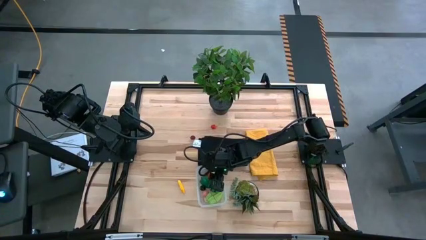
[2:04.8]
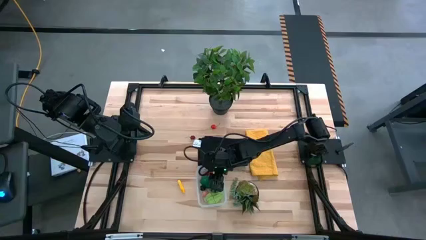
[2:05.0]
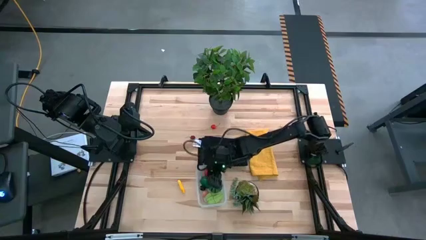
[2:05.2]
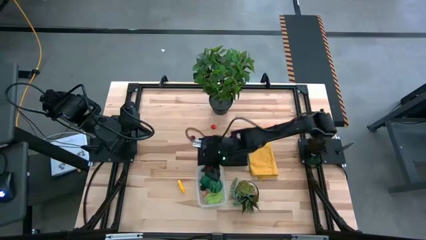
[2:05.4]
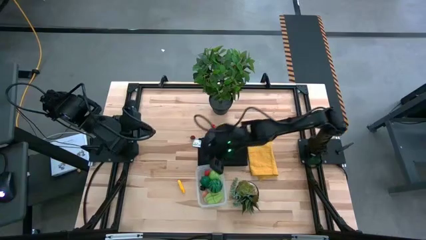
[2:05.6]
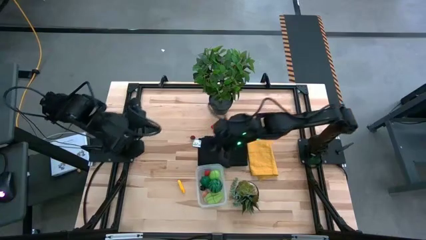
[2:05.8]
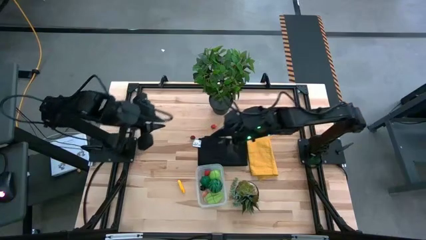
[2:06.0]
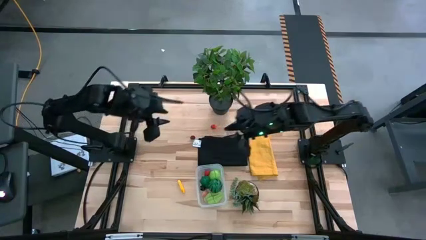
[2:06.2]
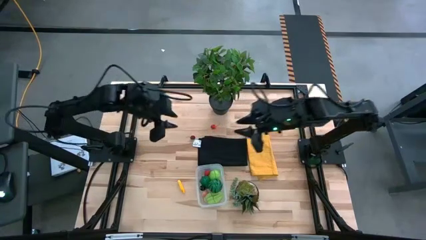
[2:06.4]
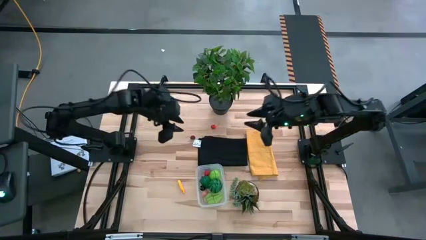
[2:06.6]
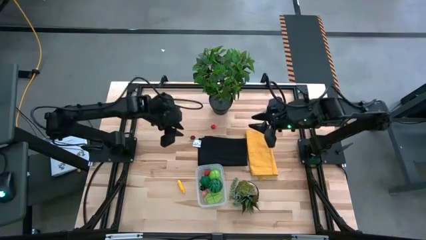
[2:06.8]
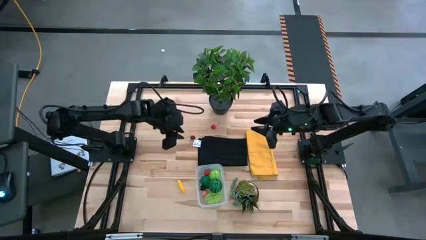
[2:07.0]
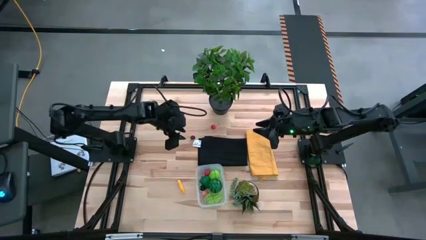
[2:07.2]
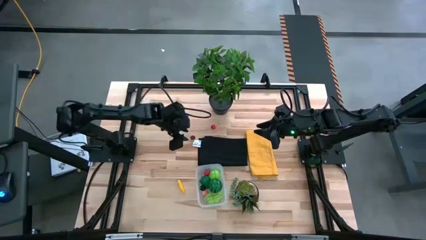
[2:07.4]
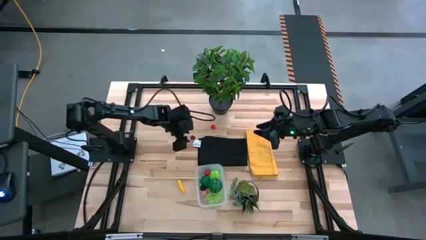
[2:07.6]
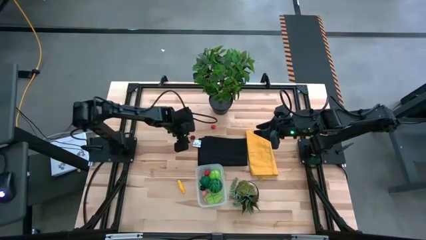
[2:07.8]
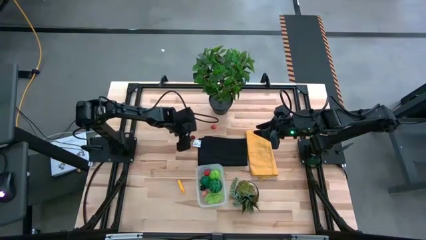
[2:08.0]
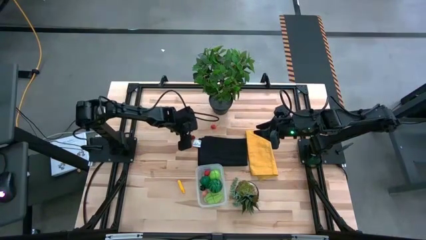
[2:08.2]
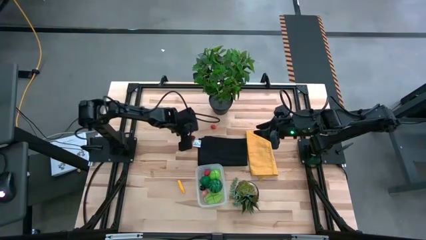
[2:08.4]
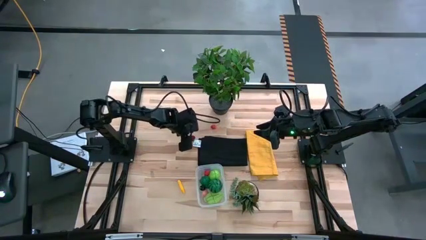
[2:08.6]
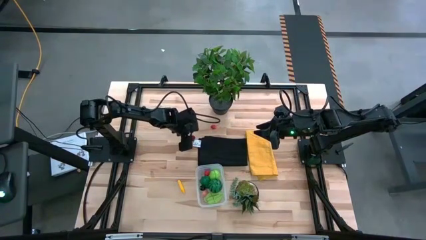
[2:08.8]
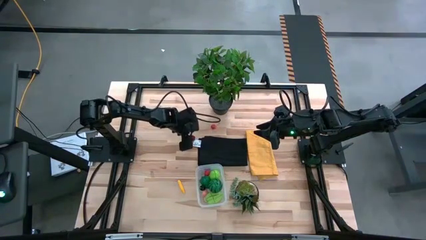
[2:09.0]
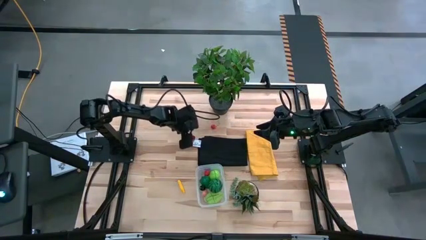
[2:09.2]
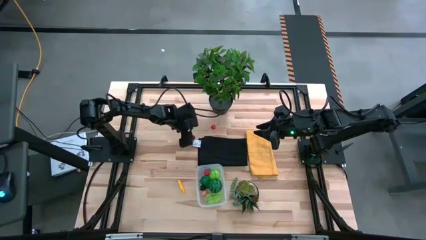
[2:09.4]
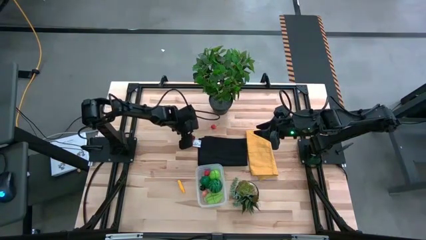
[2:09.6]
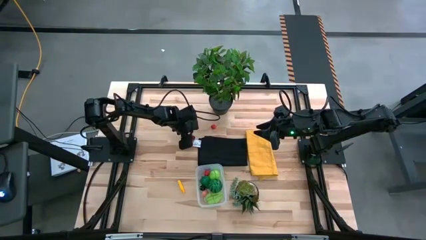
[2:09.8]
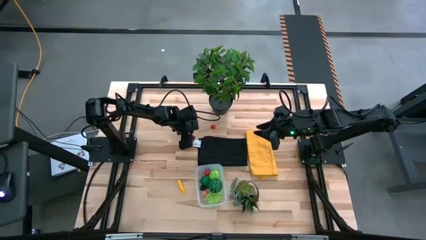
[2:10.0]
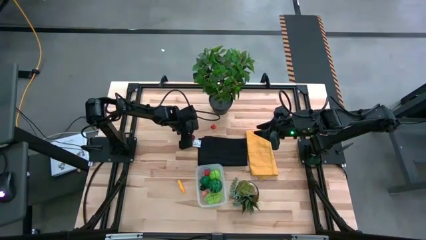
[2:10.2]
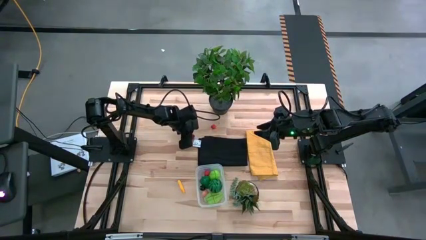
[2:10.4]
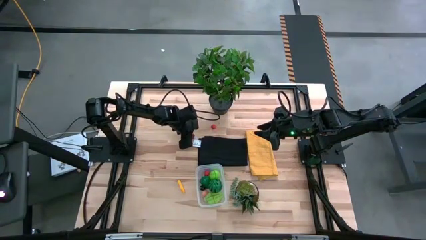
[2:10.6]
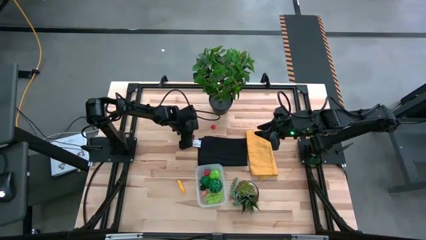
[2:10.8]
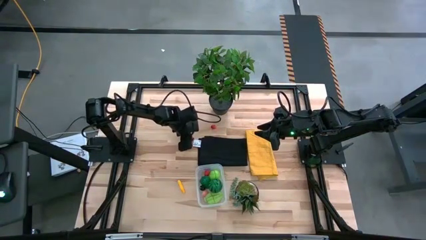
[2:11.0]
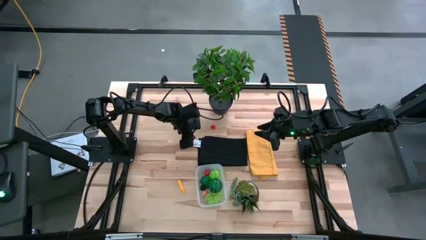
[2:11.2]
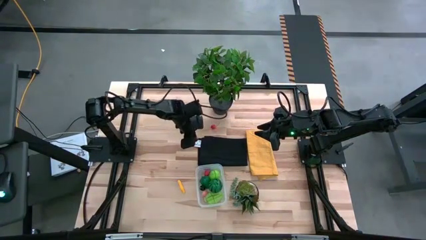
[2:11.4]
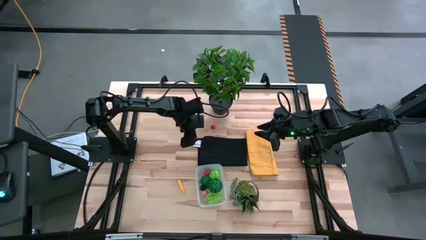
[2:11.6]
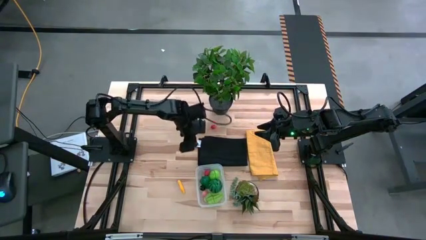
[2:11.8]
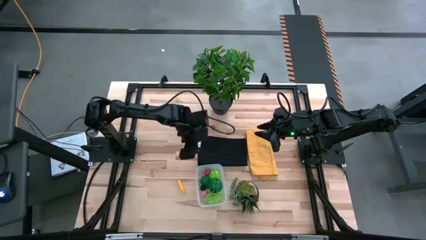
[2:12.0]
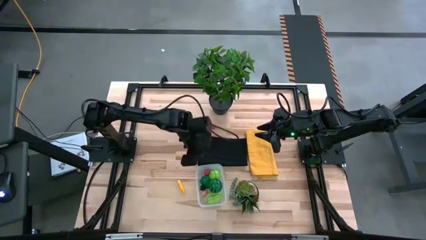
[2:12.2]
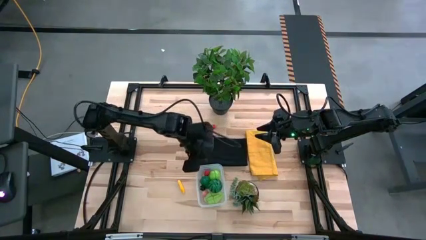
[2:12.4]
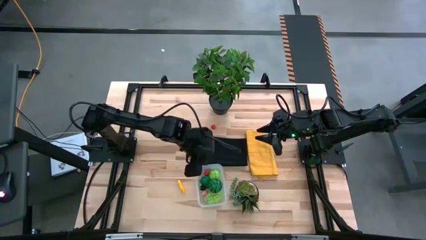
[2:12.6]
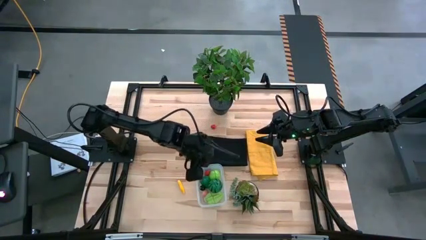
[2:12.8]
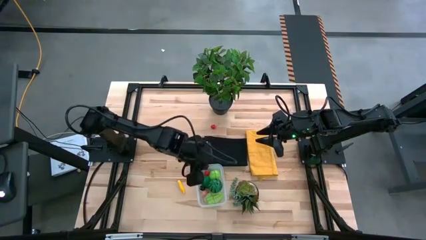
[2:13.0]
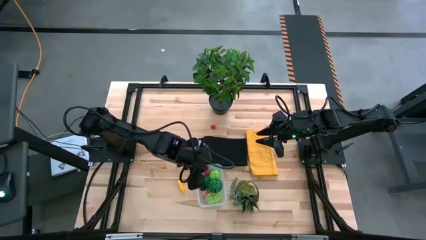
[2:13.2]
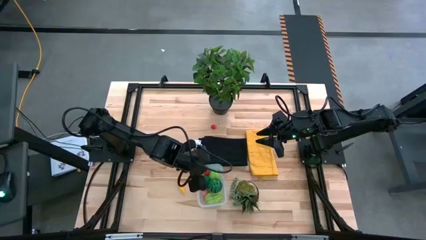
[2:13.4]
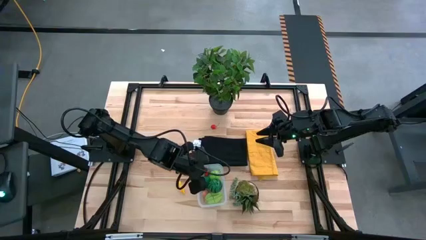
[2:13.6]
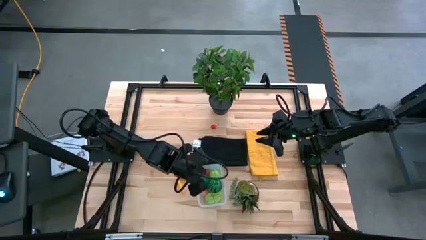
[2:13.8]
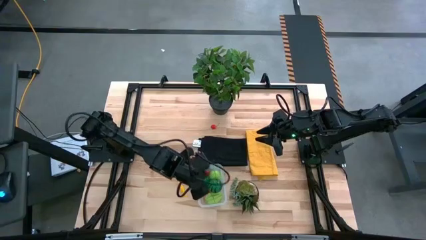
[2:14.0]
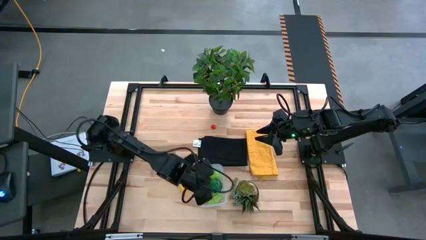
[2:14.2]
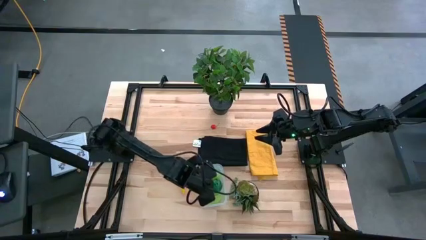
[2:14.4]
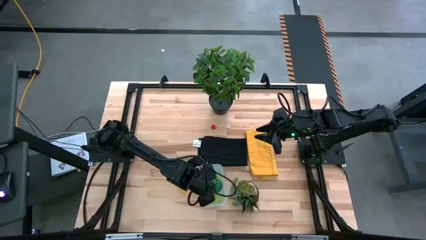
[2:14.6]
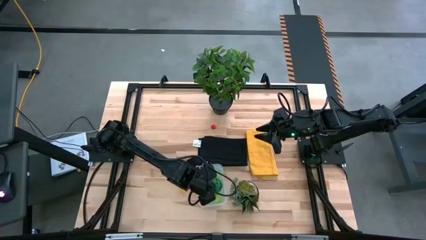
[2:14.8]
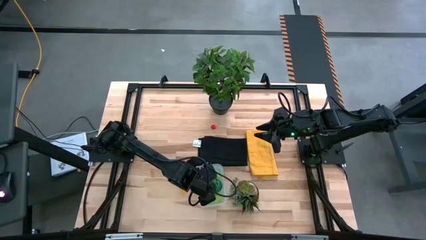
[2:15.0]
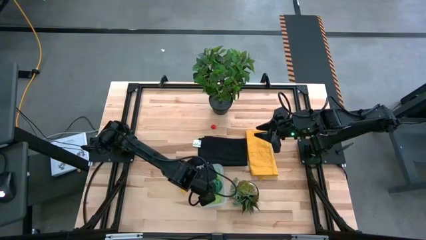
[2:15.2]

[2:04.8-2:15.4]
Task: Pick and placing Produce into tupperware
Put the left cherry into the bin

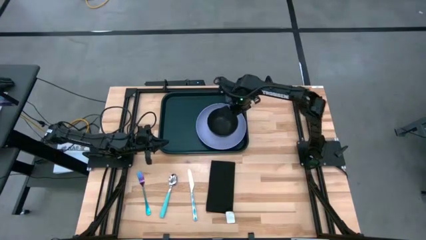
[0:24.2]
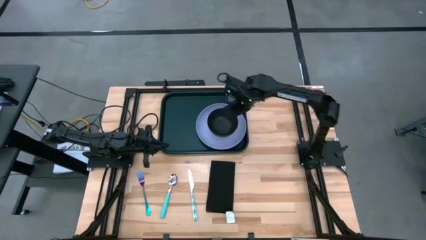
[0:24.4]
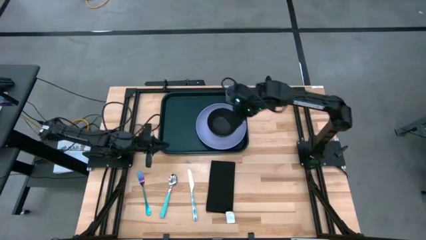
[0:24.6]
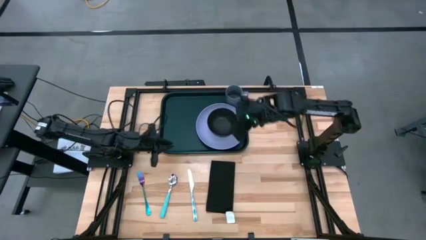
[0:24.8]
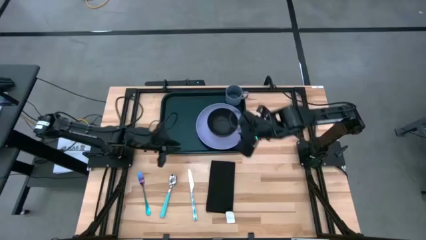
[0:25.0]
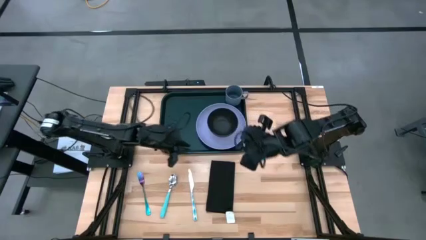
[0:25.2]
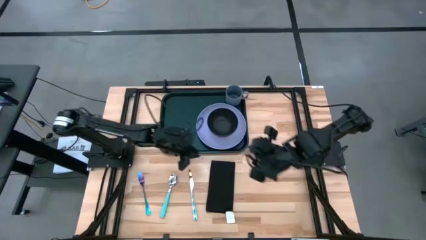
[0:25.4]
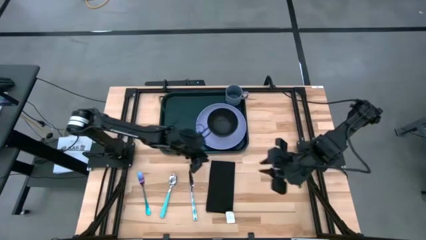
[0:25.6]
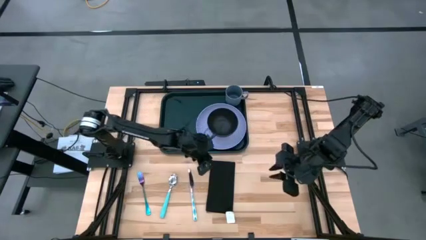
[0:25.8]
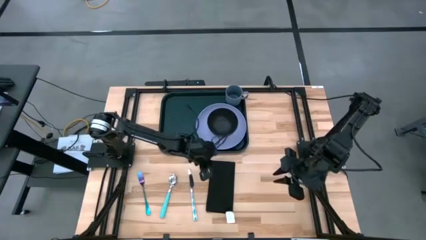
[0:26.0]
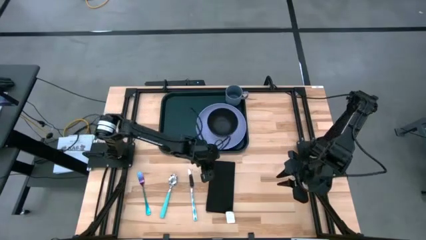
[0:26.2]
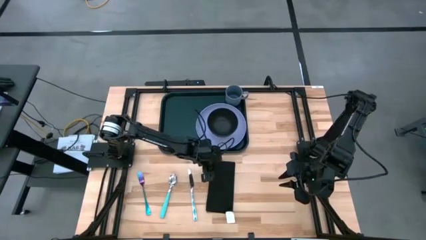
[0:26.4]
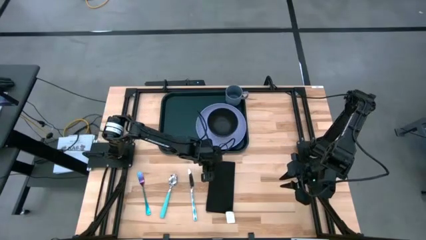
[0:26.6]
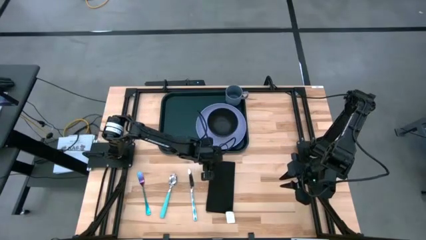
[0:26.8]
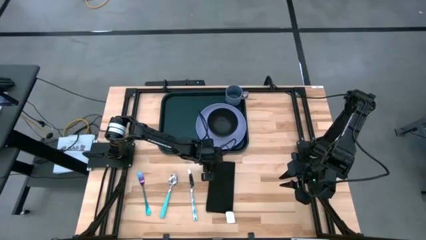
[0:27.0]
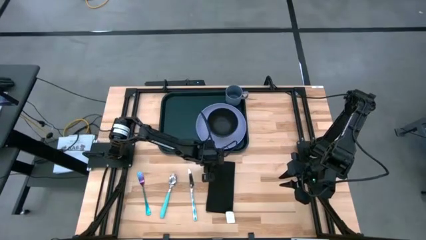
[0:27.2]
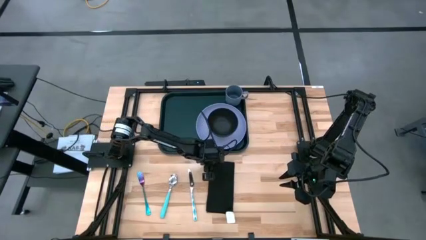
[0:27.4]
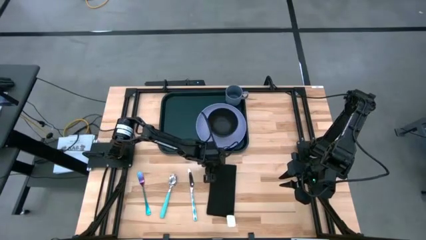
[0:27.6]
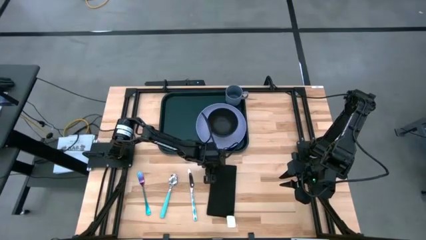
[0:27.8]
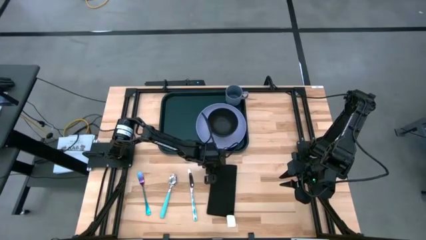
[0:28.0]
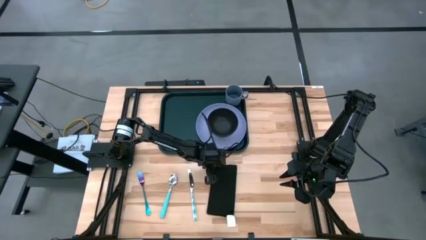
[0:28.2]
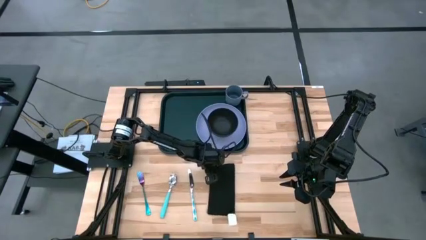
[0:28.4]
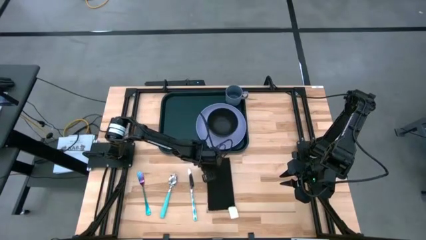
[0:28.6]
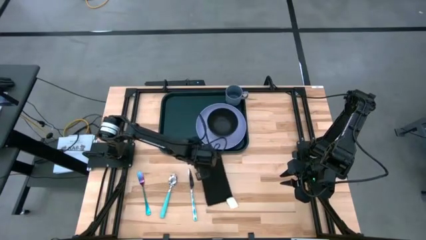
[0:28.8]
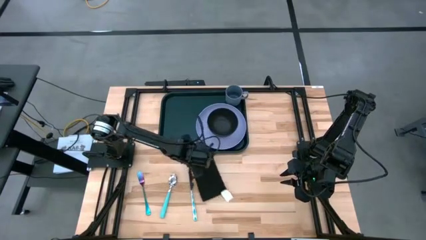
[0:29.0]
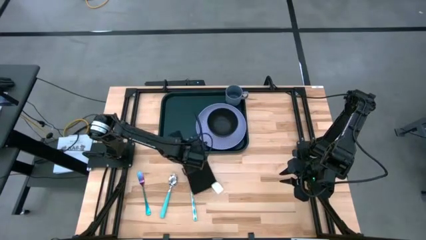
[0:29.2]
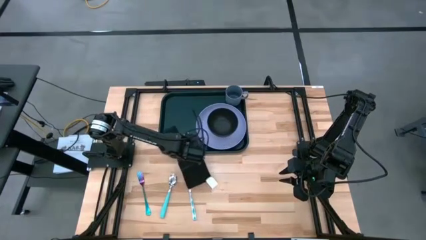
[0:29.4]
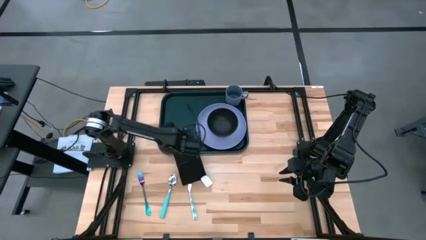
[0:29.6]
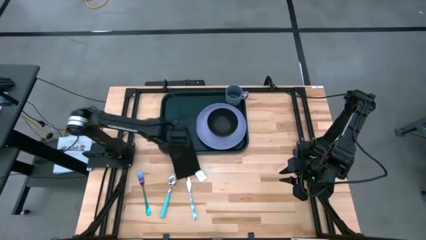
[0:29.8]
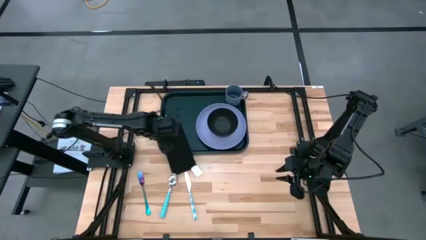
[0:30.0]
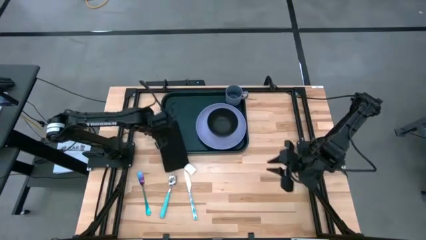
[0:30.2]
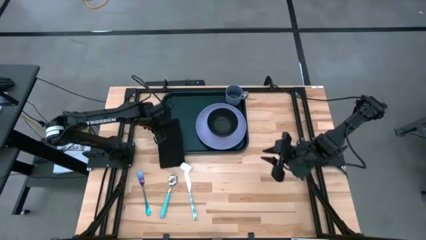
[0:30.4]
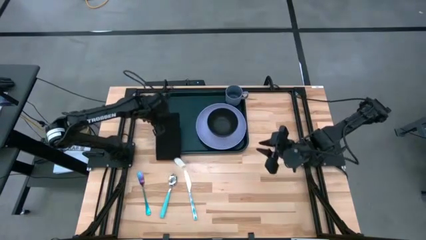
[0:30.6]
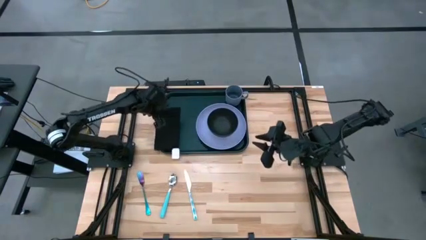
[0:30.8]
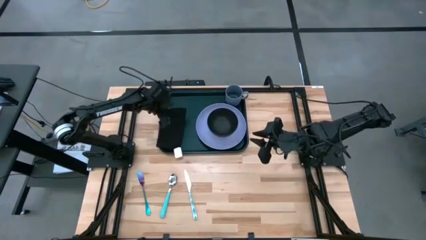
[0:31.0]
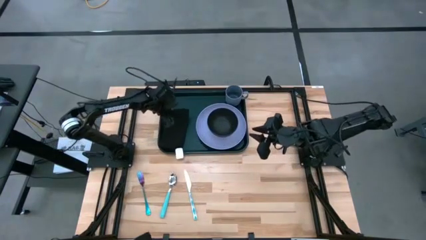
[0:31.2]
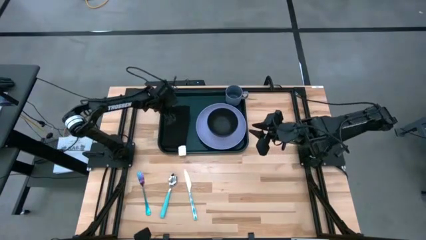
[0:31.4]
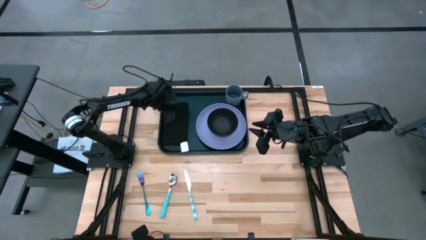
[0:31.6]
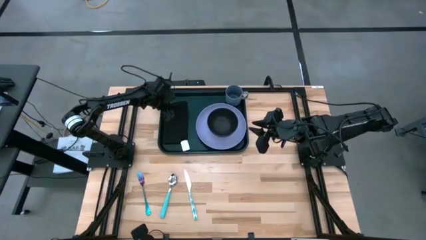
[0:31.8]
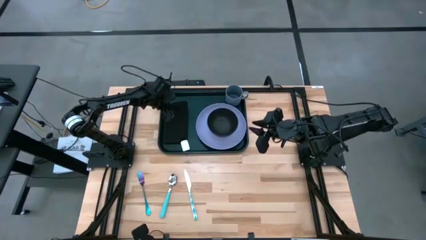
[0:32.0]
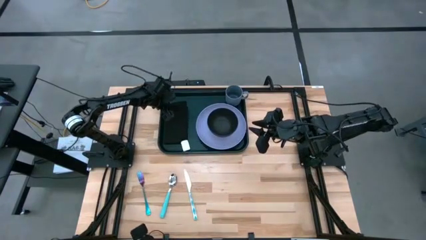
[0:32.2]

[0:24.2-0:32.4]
Task: Set up tray
Put the black napkin to the left of the violet plate on the black tray
